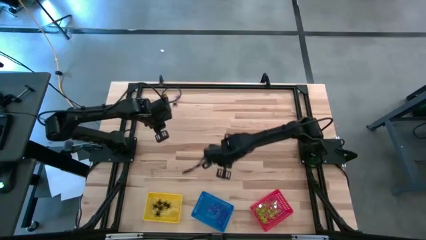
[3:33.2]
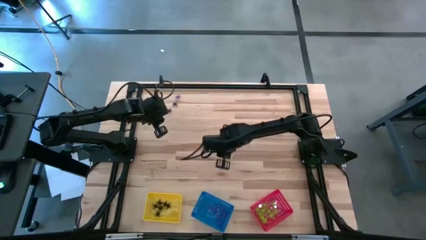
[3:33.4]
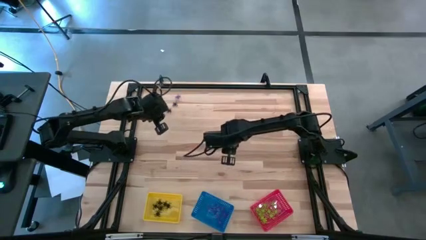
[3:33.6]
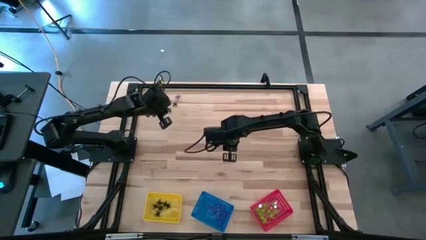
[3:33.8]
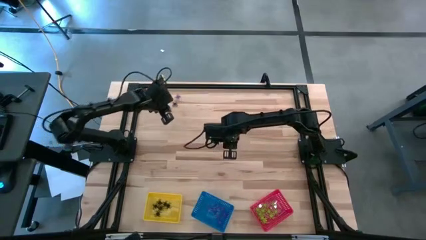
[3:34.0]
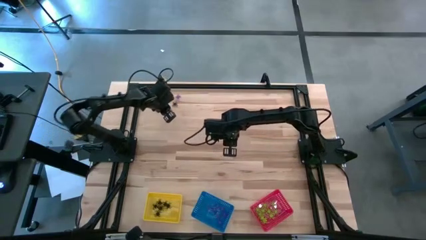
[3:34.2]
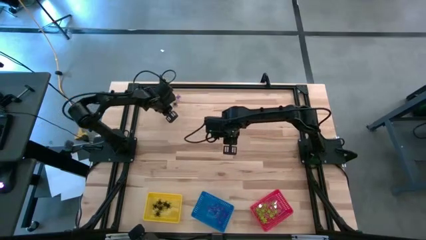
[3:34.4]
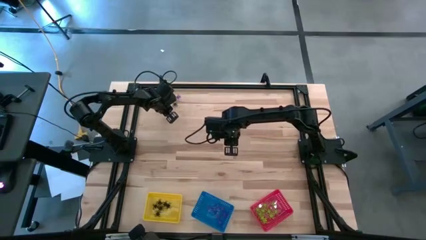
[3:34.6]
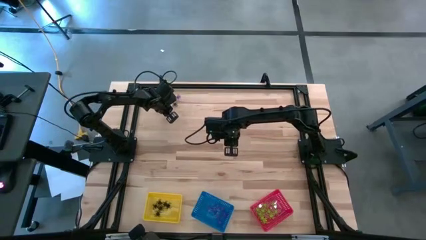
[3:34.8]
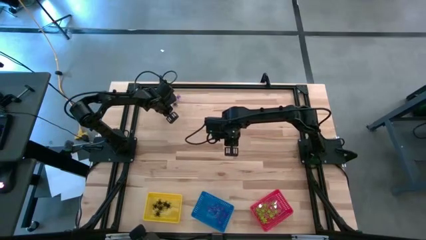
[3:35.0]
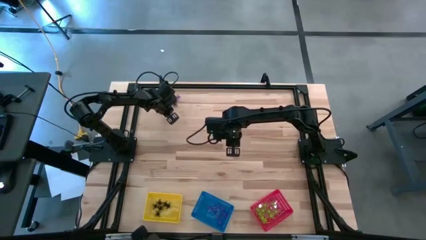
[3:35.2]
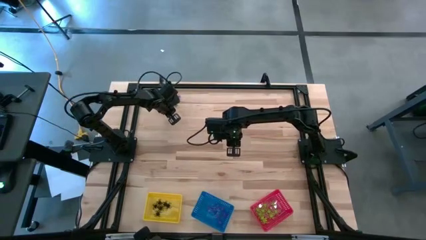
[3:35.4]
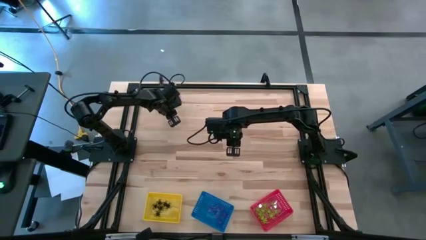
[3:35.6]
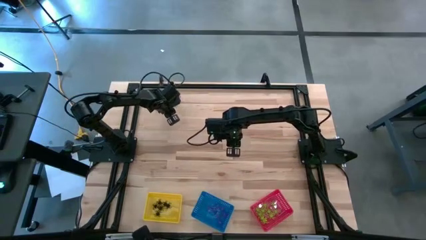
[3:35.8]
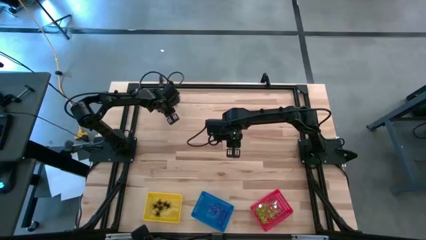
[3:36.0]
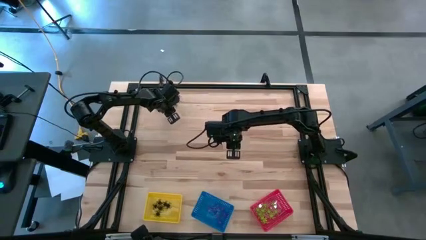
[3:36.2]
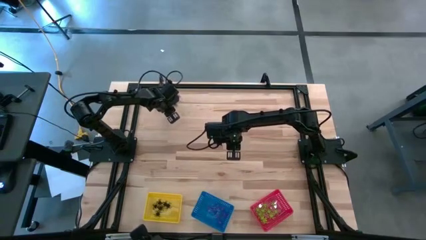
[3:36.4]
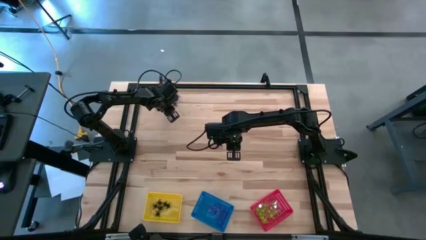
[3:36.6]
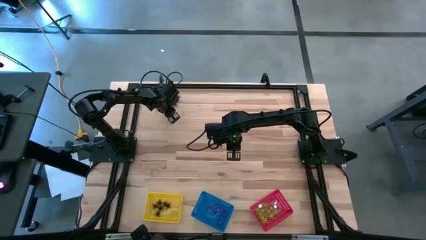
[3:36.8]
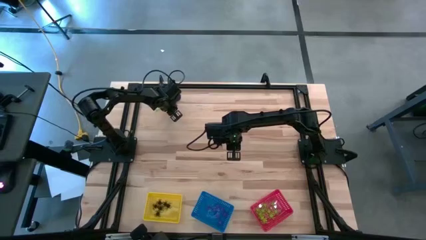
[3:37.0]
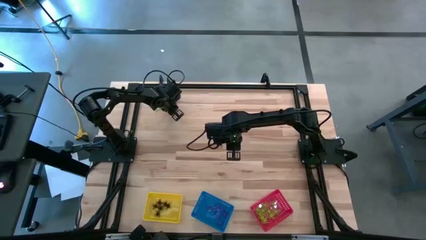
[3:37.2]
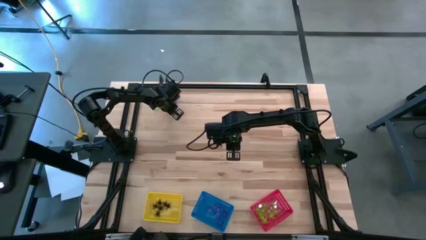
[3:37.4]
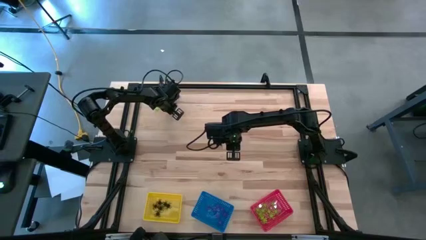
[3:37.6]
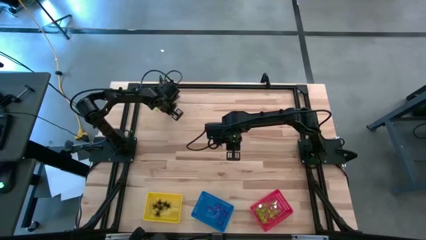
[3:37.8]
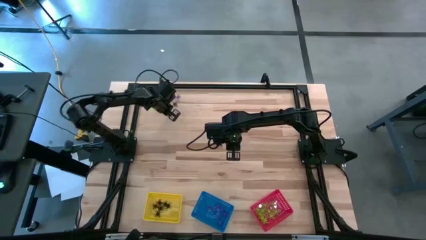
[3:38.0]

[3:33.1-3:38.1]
Task: Sort Halloween decoration
Put the black spider toy into the yellow bin

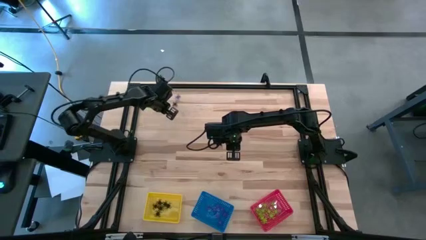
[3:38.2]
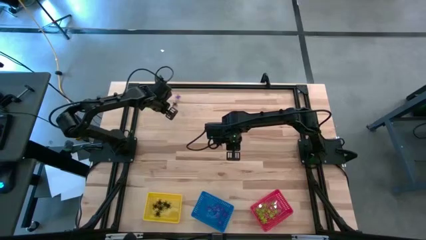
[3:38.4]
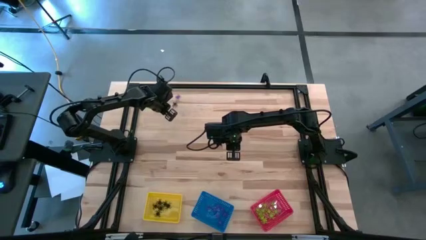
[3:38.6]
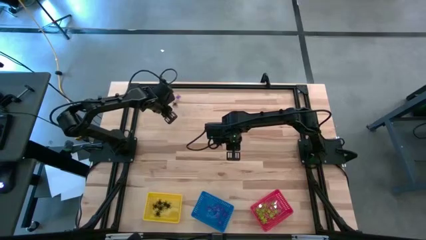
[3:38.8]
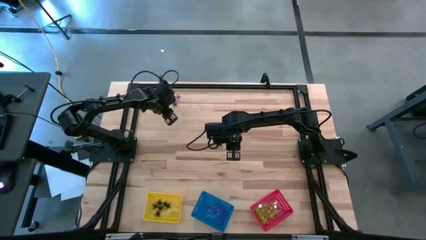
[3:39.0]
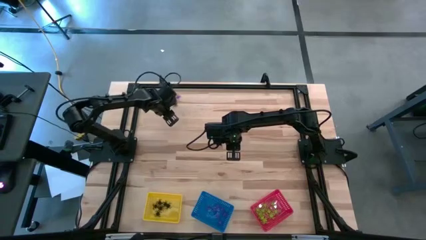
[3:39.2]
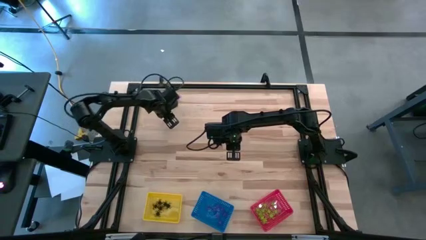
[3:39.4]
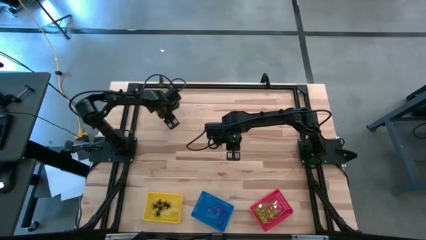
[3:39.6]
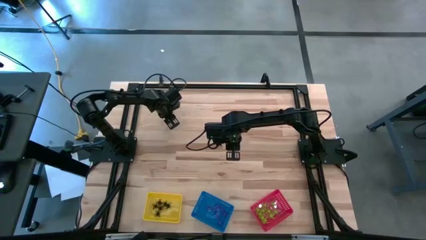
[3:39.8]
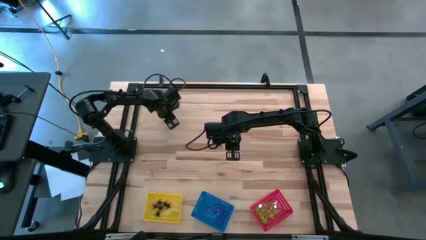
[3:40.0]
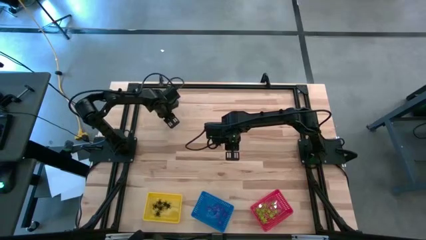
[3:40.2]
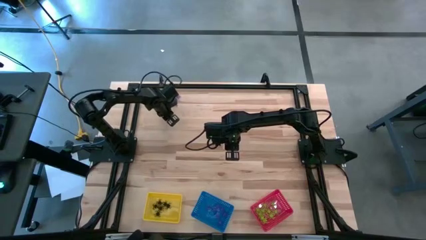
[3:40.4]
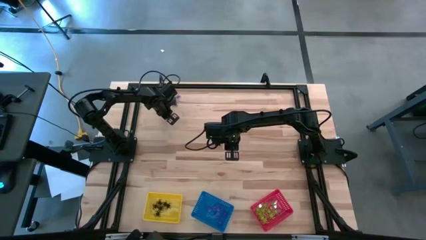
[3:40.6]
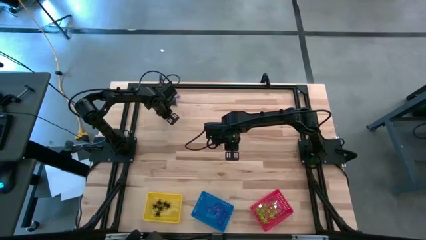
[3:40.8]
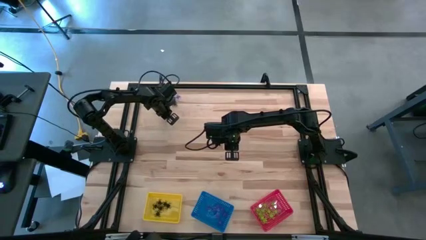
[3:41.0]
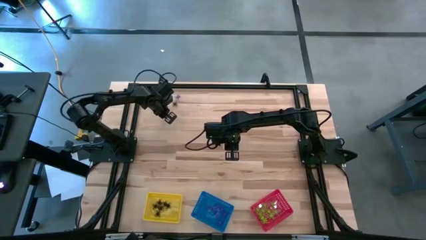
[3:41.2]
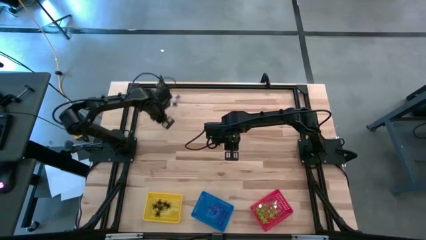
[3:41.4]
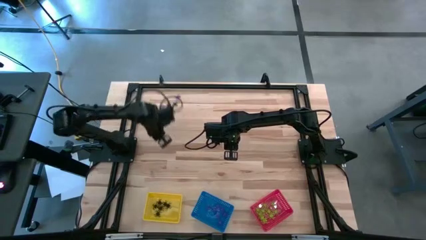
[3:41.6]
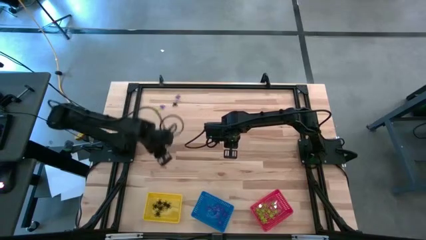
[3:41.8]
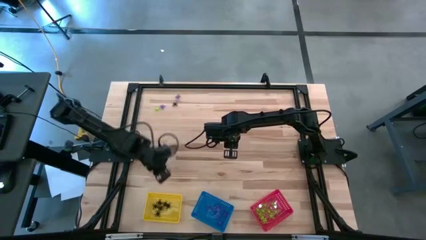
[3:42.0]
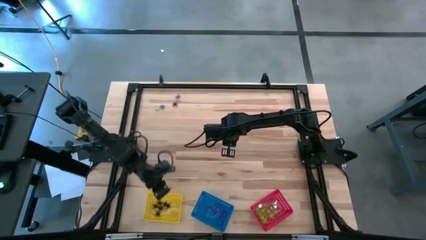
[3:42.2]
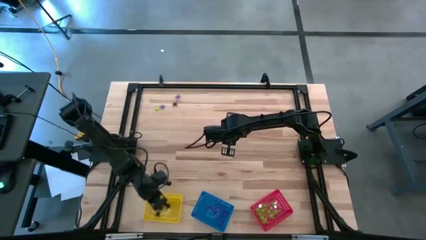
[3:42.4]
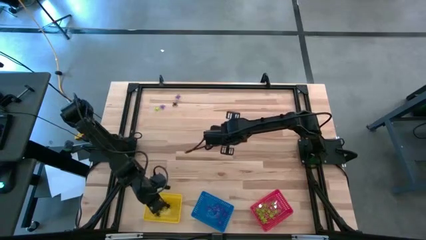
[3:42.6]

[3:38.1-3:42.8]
Put the black spider toy into the yellow bin

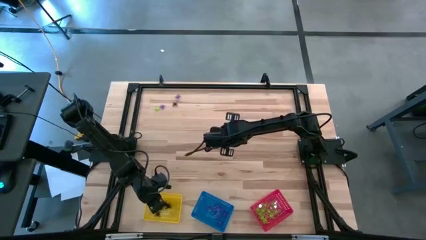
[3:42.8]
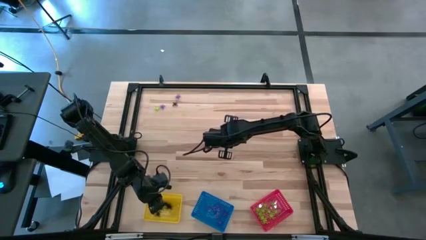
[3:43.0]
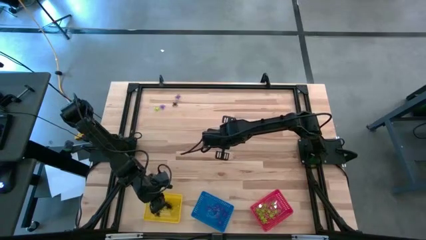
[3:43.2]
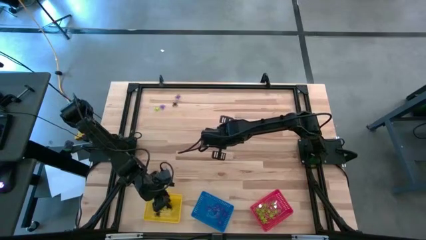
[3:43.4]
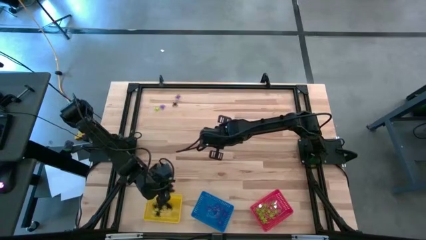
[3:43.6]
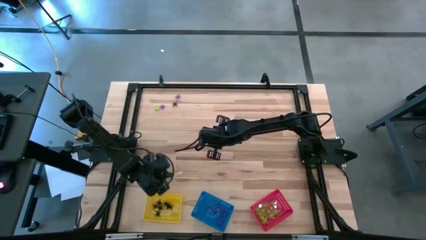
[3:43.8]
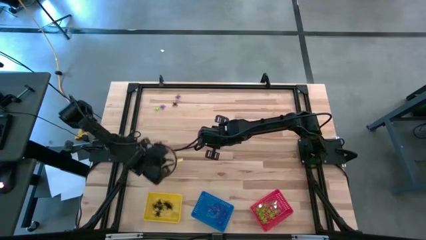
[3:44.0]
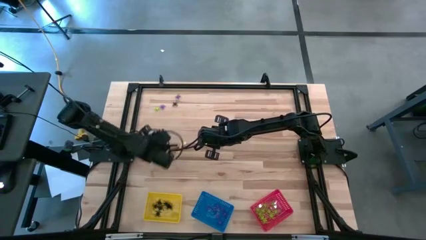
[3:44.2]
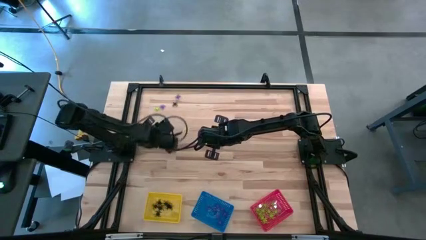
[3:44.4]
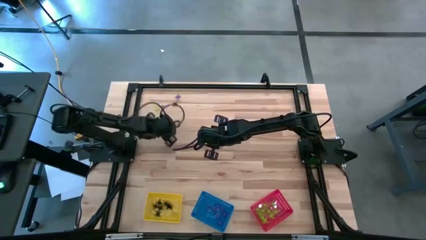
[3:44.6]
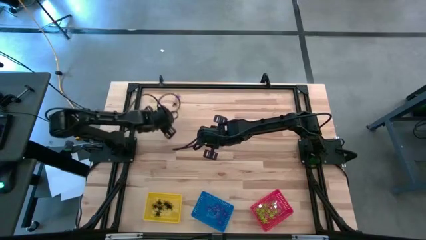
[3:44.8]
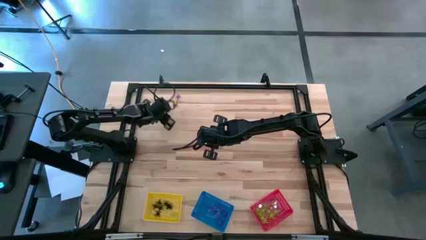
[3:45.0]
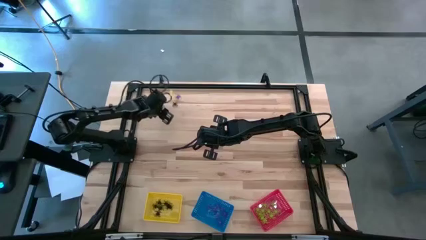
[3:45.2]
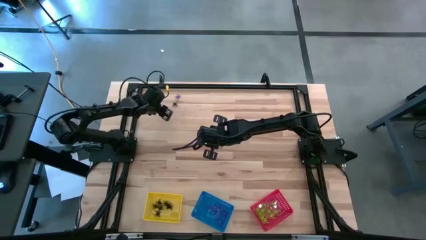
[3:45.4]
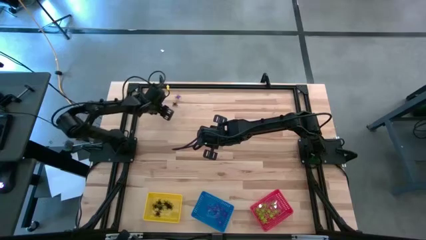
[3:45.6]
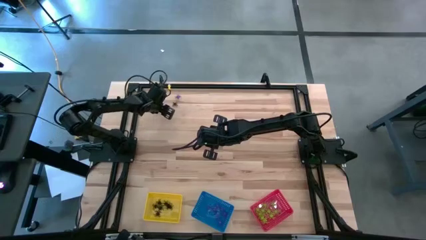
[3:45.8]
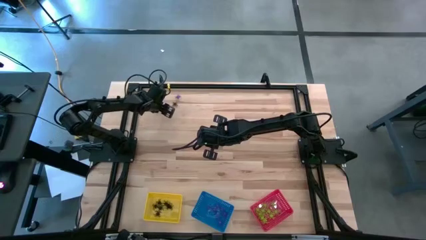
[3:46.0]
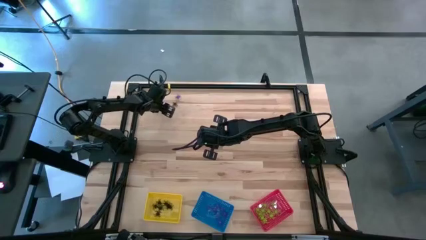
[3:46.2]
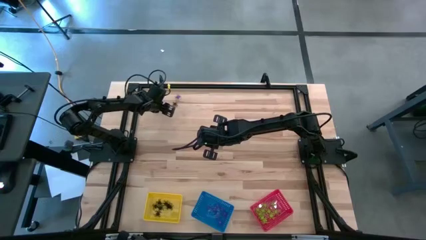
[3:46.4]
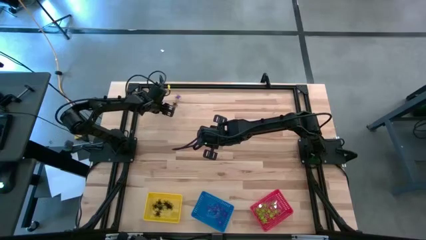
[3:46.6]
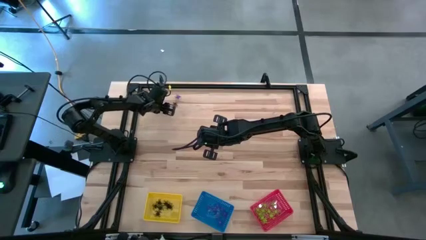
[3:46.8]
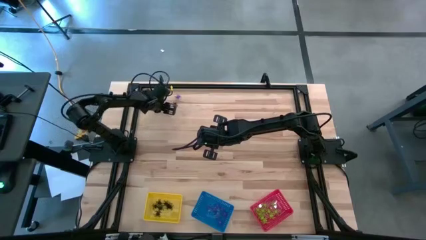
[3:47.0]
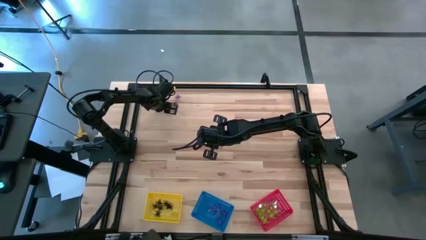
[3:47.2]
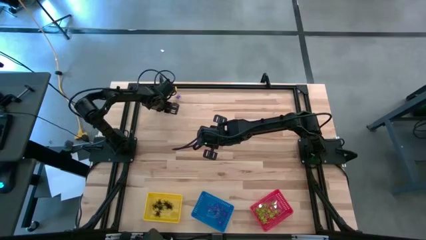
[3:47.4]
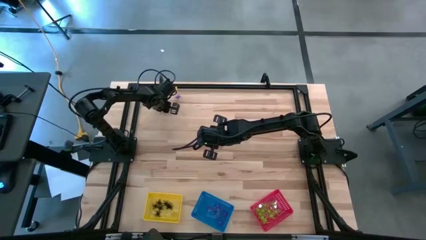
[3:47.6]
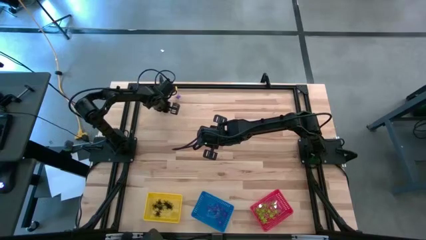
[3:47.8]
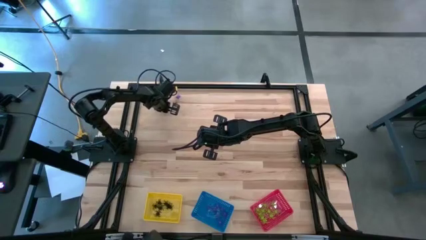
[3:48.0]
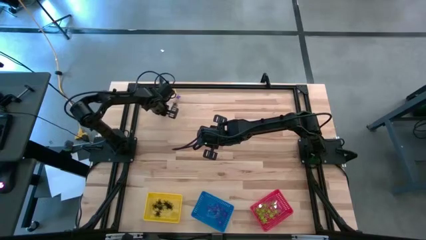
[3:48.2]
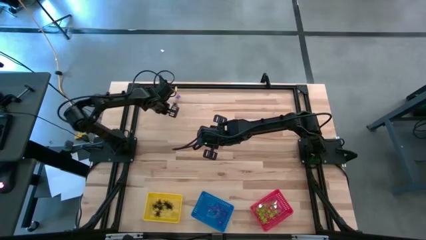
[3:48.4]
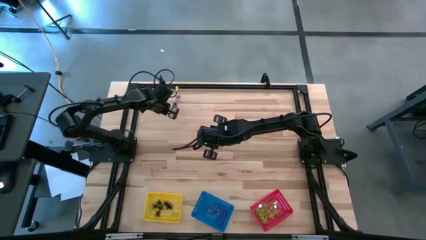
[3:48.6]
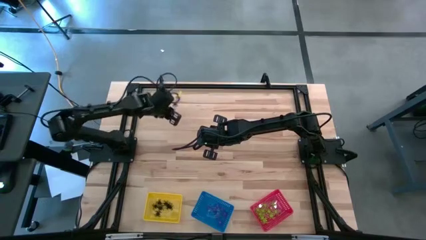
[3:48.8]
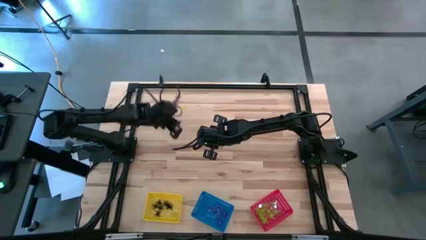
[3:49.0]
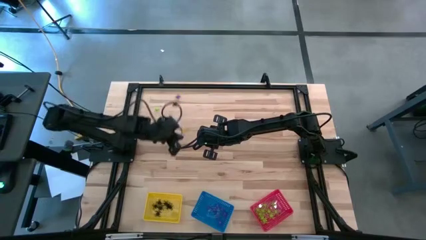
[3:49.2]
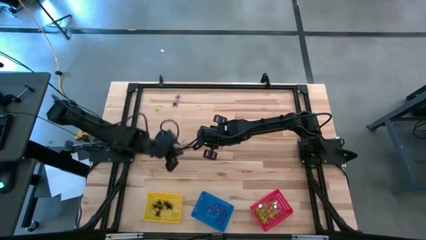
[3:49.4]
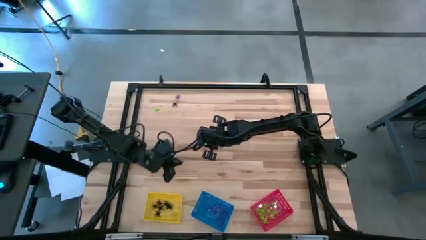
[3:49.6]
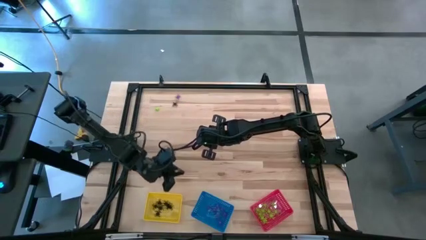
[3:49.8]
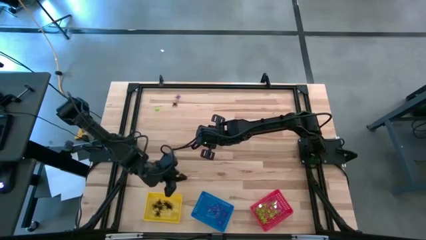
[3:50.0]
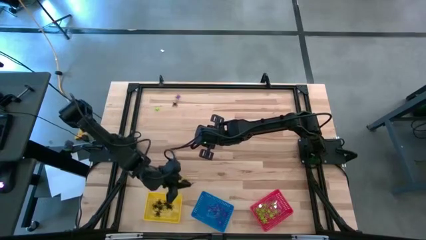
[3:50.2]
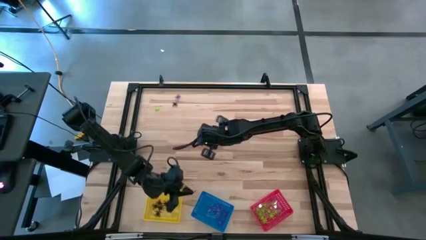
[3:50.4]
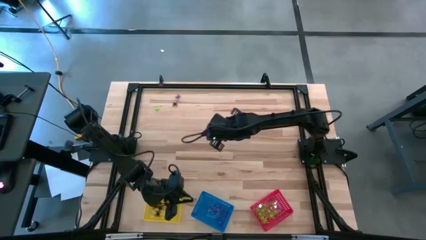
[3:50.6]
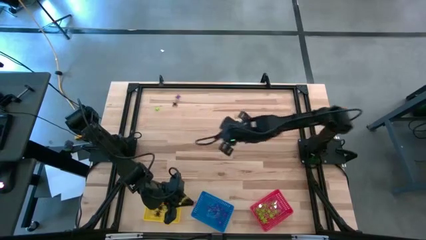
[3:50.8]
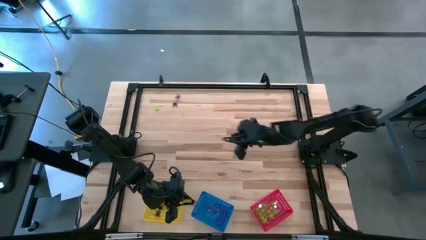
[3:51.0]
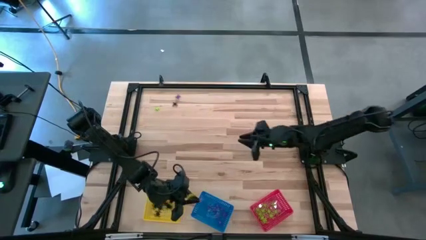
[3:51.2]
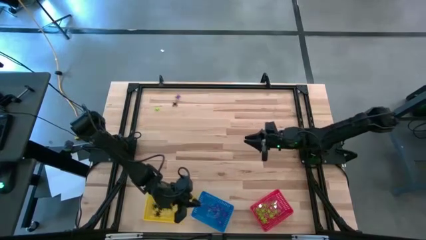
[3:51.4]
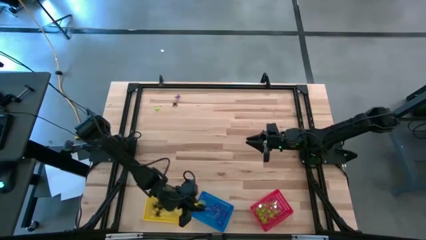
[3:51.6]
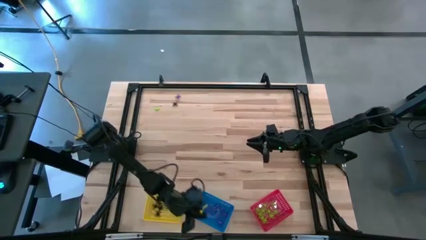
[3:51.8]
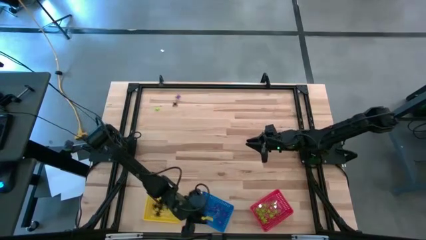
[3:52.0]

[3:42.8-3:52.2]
Put the violet spider toy into the blue bin
